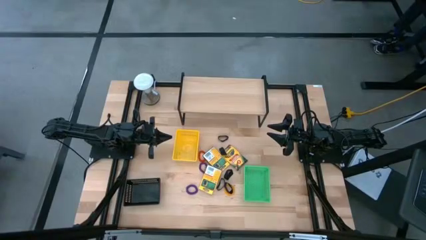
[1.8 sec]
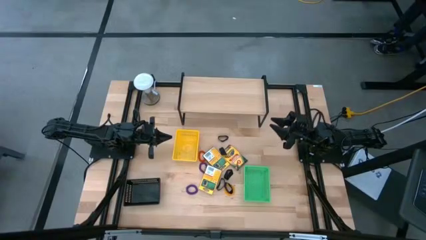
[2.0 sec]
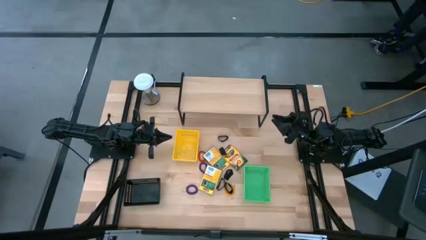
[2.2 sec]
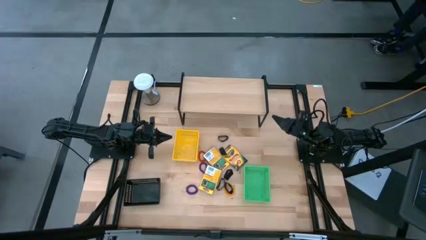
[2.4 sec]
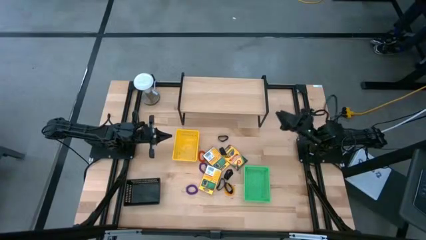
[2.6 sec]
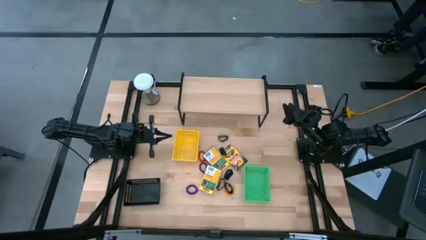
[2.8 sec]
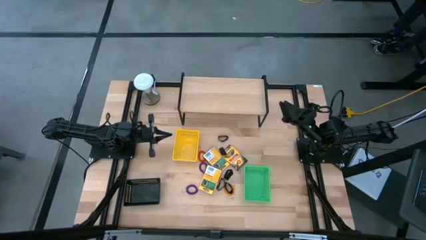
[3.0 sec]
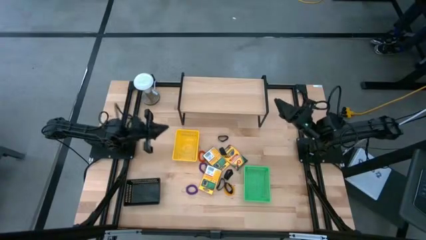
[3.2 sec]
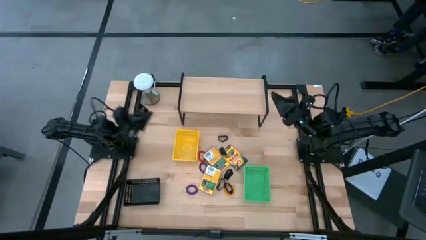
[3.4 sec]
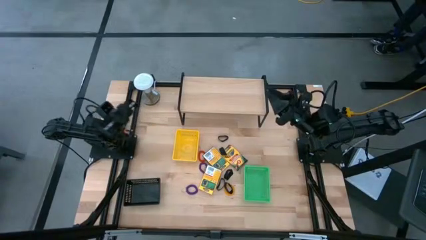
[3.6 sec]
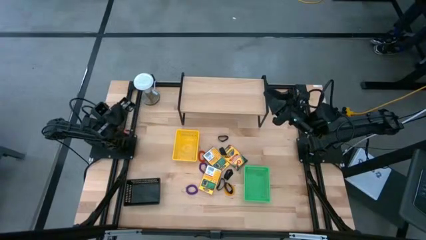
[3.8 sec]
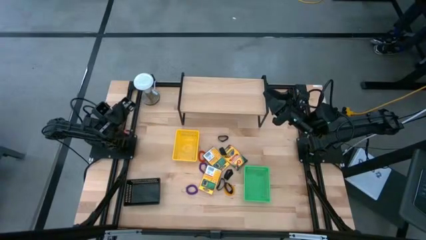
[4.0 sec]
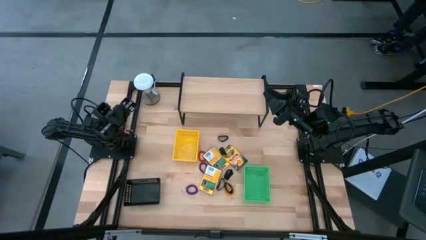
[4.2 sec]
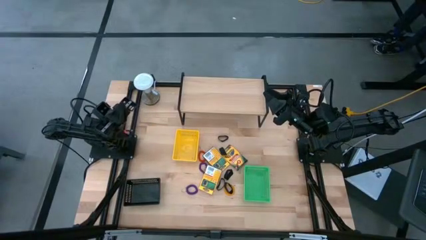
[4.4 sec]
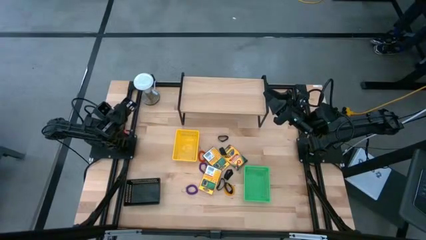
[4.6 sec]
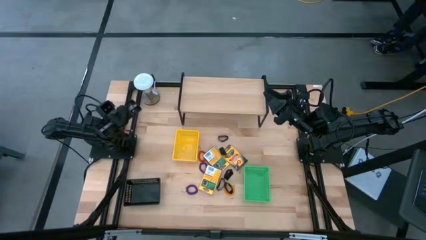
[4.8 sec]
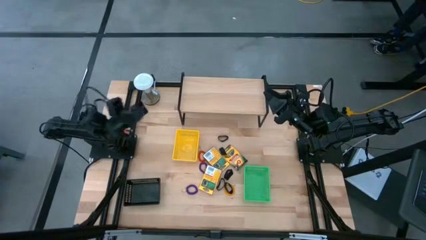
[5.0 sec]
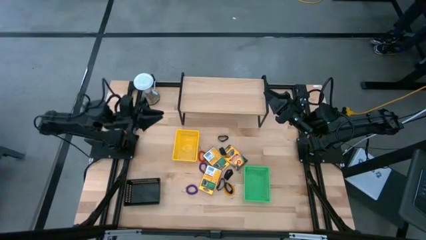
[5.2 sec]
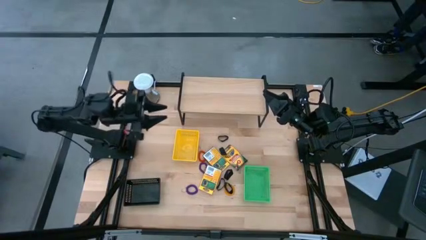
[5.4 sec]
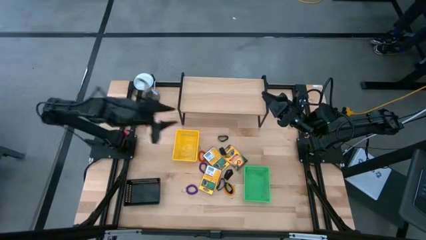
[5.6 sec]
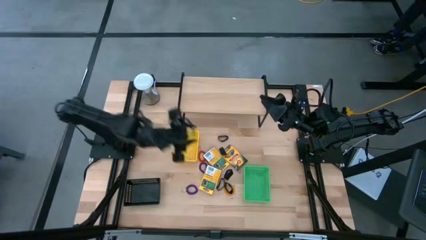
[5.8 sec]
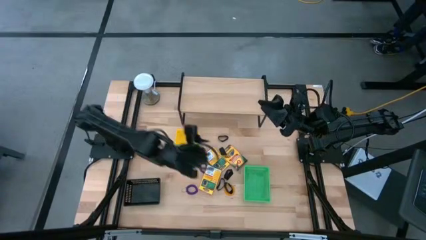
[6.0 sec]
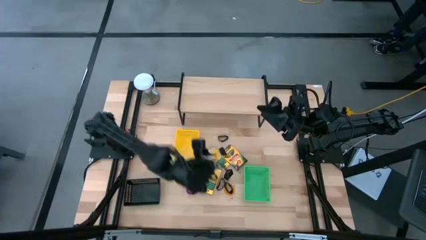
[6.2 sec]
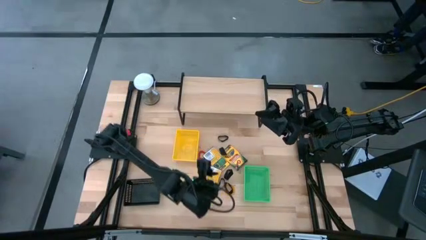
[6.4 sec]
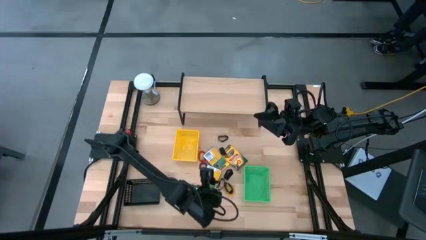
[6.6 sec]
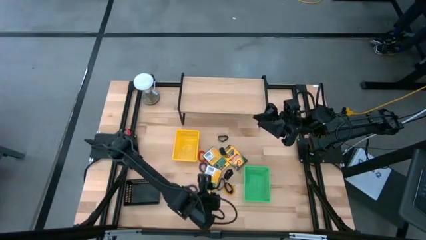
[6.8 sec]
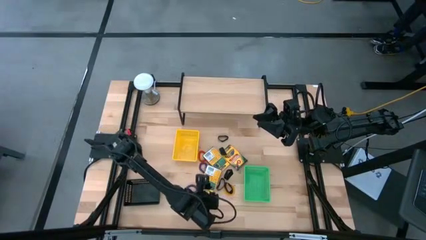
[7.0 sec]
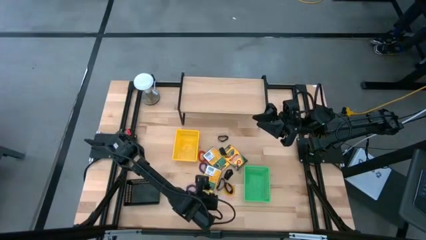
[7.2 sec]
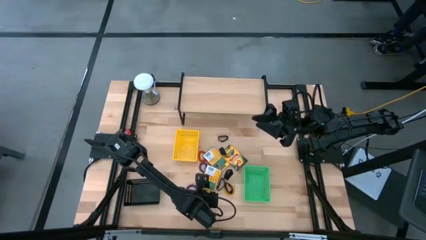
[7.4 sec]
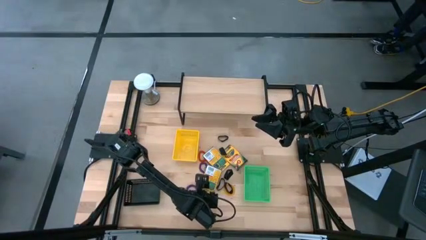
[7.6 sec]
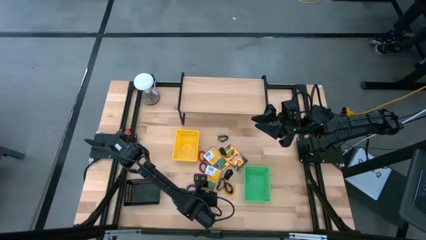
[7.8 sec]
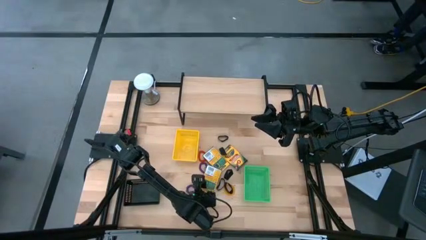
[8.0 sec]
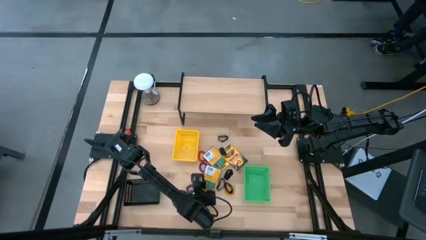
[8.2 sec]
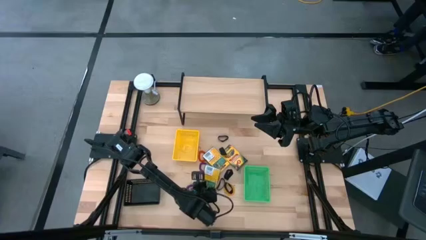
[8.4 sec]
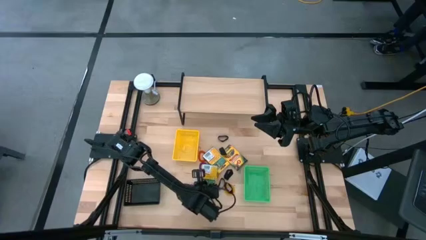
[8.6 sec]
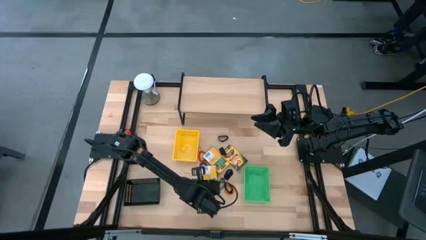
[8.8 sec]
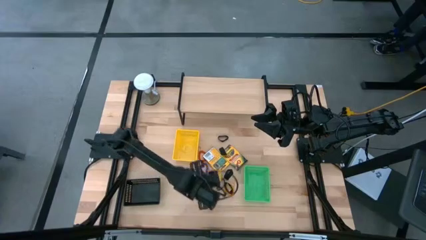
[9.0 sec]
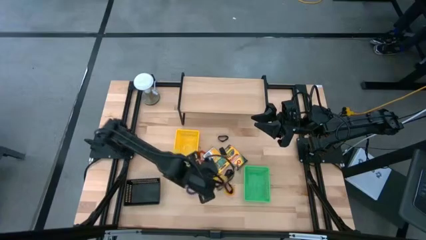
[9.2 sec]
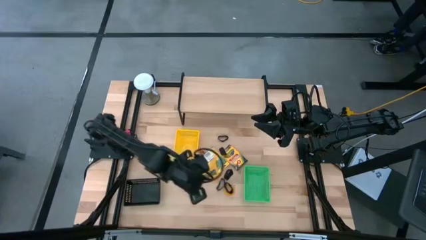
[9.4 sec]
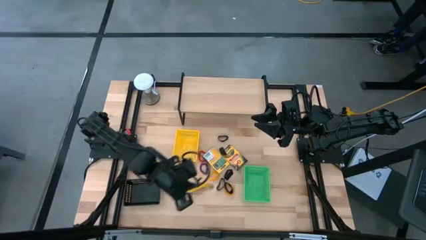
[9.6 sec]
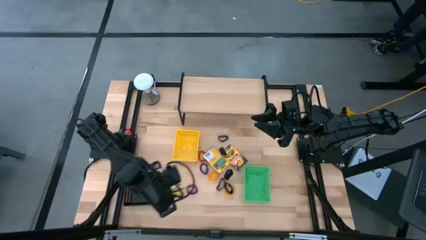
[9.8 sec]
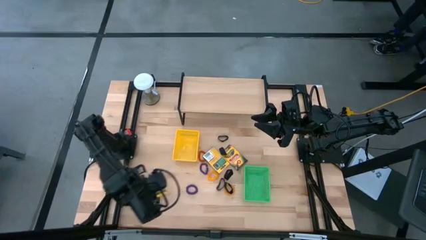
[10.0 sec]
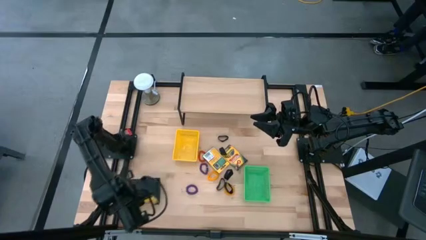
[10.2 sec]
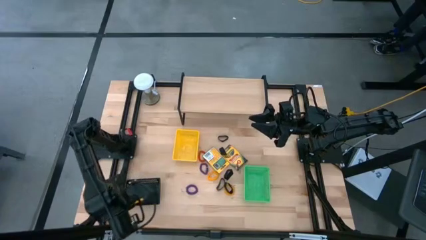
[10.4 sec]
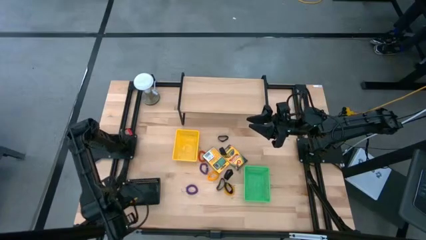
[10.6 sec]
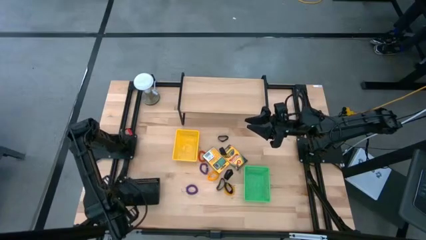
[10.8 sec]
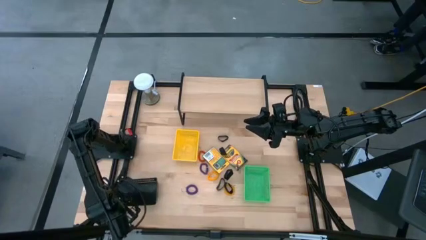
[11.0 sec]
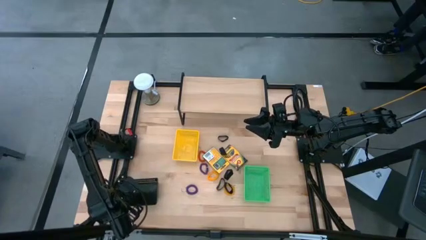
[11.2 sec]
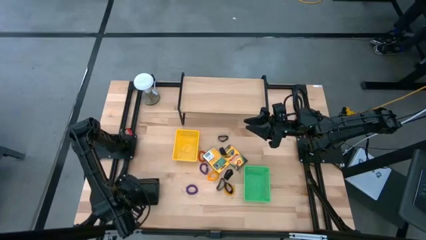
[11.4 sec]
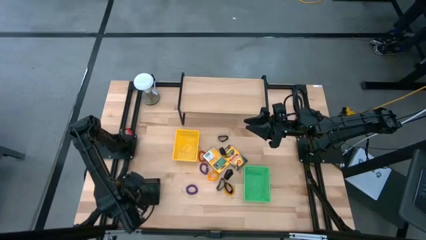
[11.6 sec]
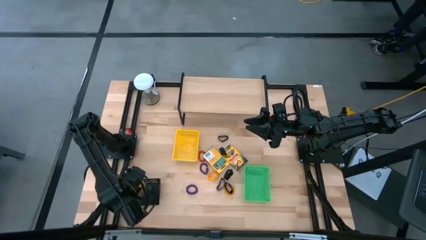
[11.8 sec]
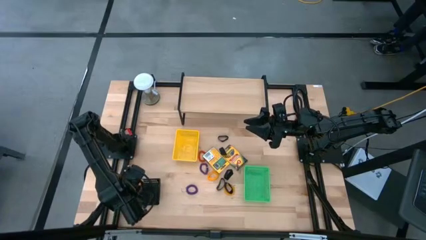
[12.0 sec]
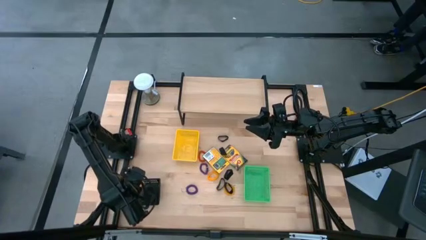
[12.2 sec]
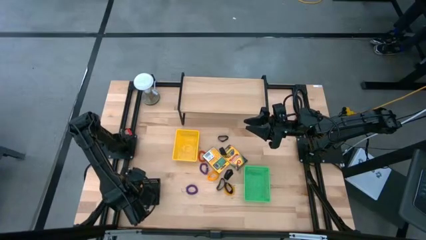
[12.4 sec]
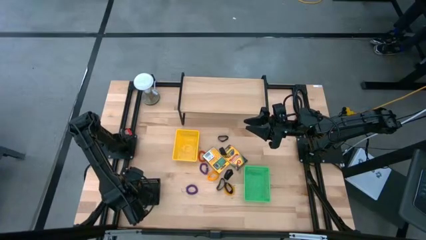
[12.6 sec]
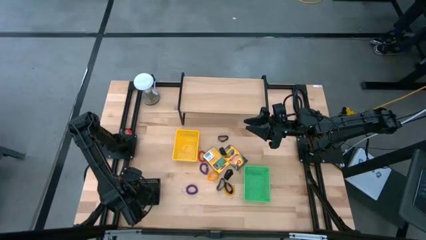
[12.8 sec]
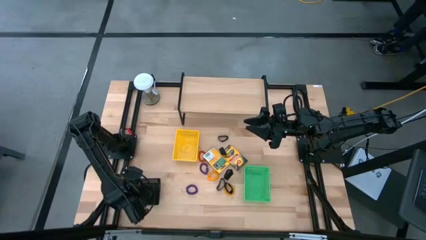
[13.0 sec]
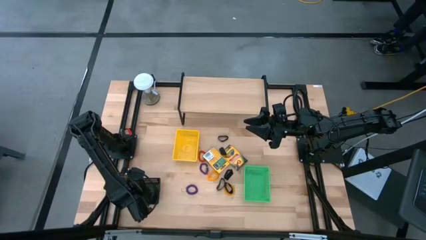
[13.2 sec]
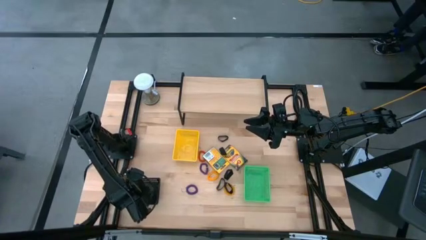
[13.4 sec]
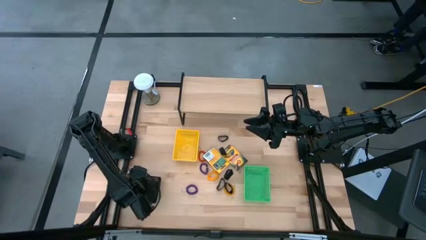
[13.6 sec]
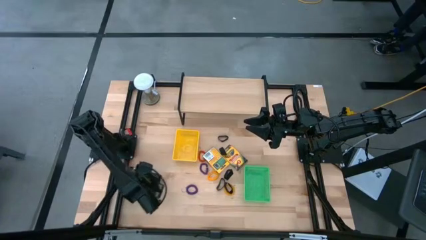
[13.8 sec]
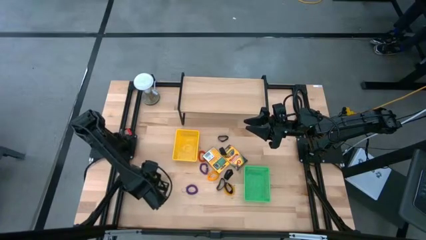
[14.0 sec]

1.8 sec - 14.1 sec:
Task: Pick & Place Office Desk Supplies
Put the yellow crayon box into the black bin
